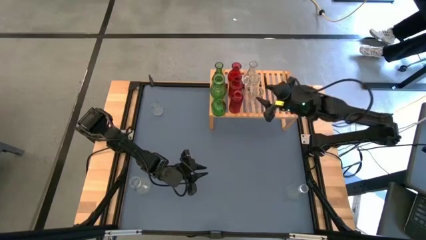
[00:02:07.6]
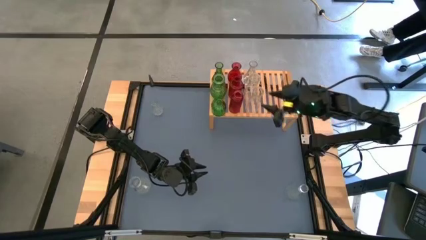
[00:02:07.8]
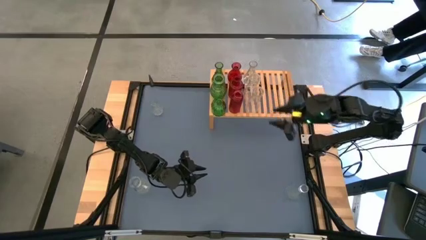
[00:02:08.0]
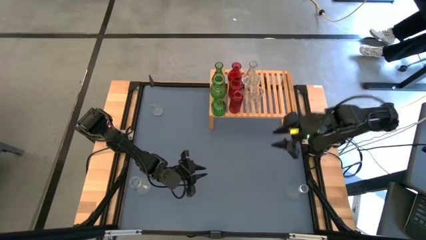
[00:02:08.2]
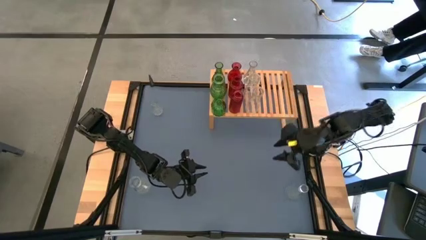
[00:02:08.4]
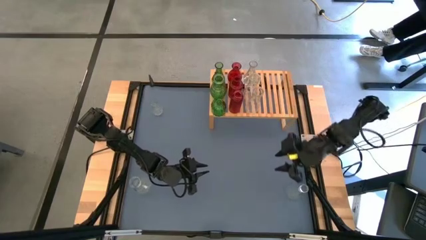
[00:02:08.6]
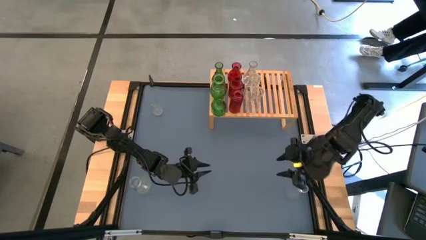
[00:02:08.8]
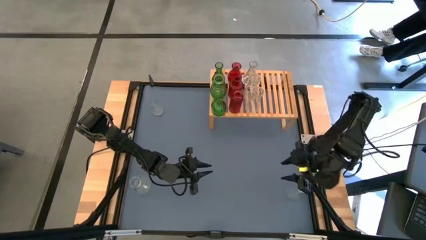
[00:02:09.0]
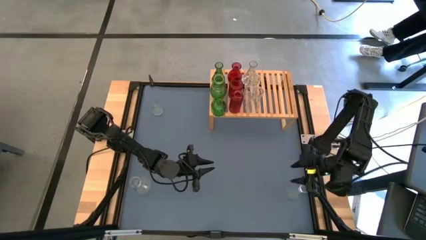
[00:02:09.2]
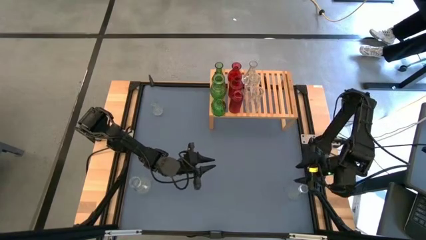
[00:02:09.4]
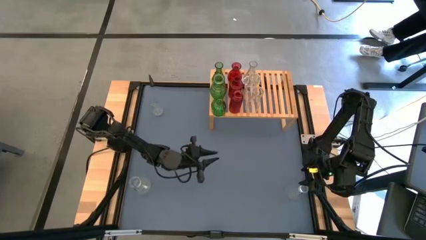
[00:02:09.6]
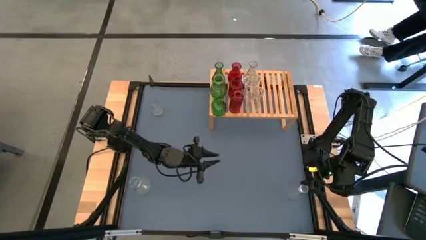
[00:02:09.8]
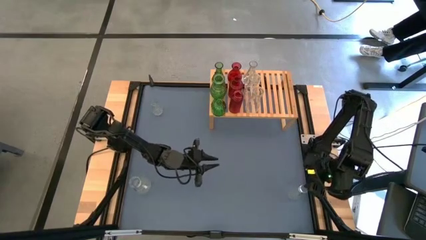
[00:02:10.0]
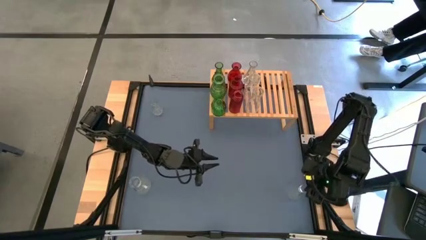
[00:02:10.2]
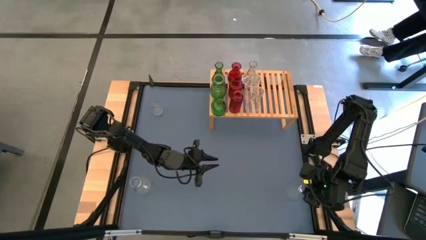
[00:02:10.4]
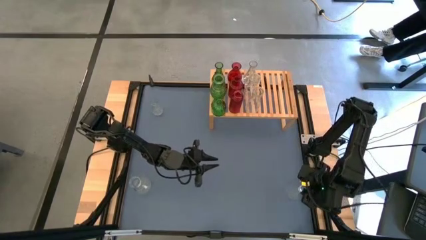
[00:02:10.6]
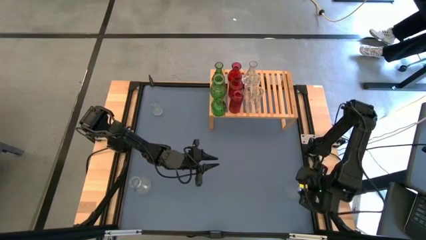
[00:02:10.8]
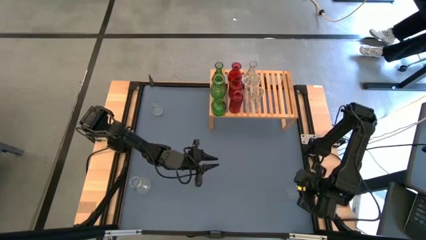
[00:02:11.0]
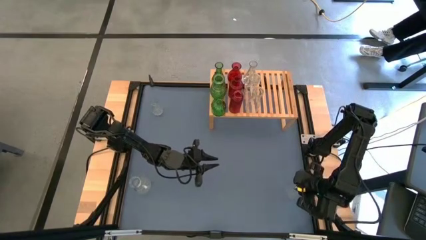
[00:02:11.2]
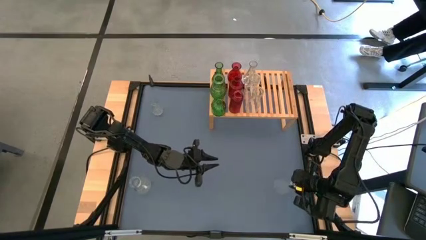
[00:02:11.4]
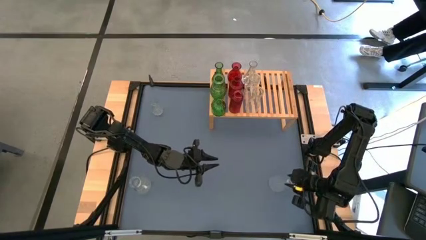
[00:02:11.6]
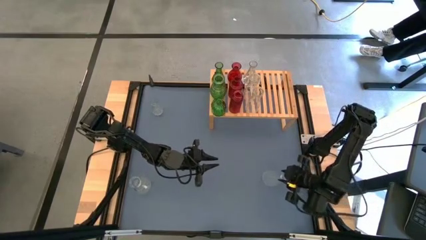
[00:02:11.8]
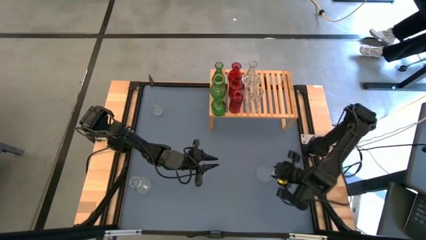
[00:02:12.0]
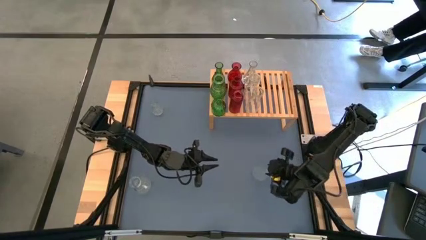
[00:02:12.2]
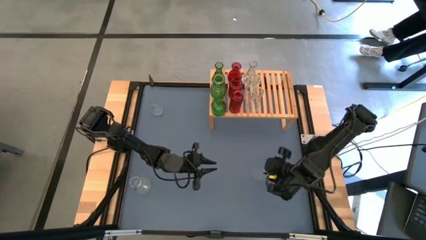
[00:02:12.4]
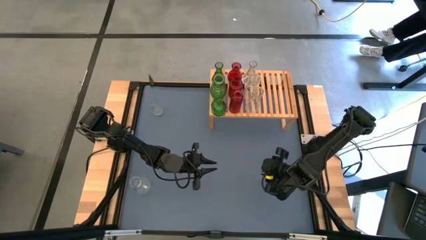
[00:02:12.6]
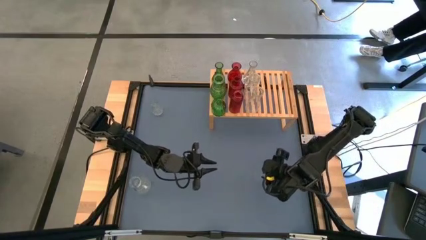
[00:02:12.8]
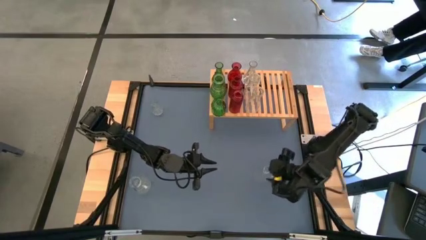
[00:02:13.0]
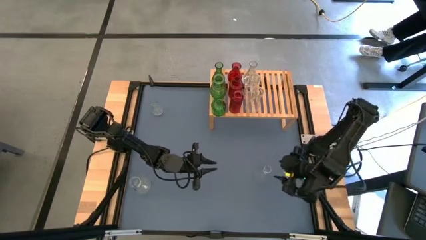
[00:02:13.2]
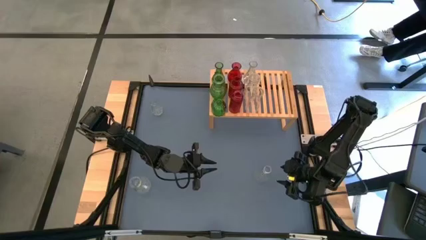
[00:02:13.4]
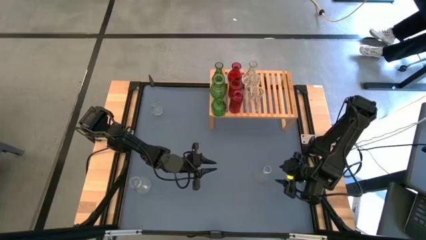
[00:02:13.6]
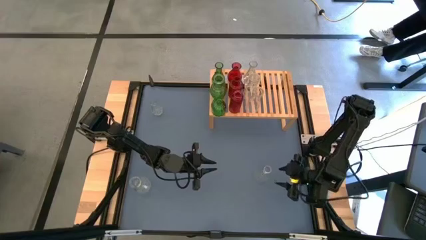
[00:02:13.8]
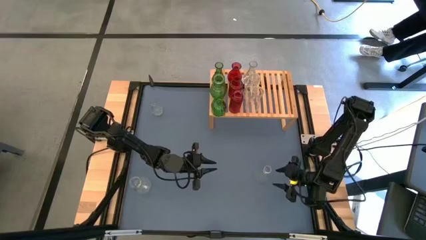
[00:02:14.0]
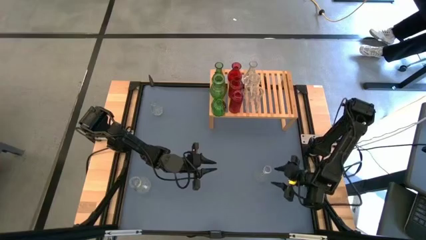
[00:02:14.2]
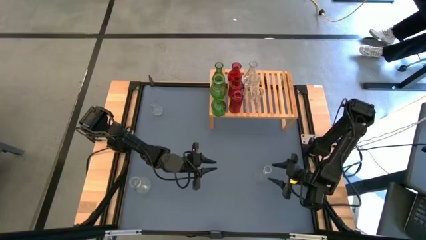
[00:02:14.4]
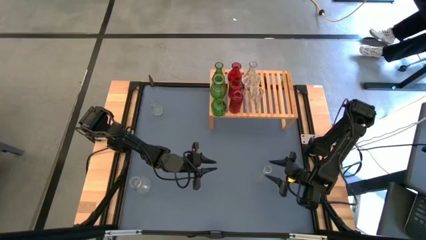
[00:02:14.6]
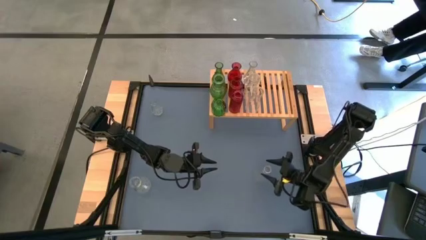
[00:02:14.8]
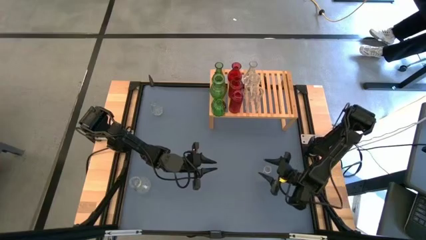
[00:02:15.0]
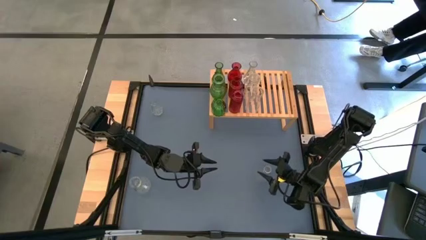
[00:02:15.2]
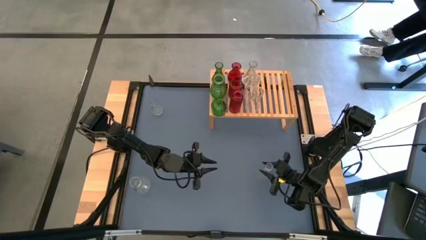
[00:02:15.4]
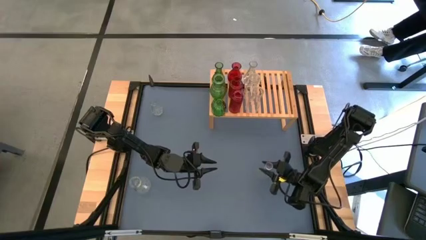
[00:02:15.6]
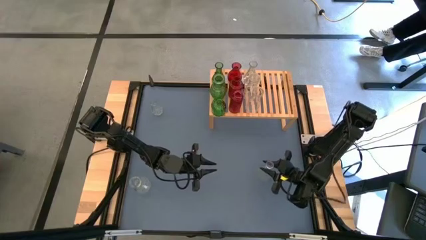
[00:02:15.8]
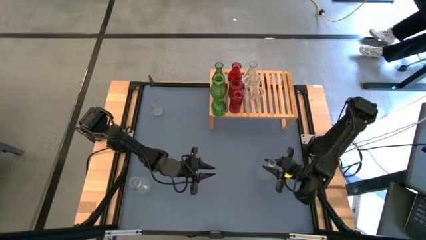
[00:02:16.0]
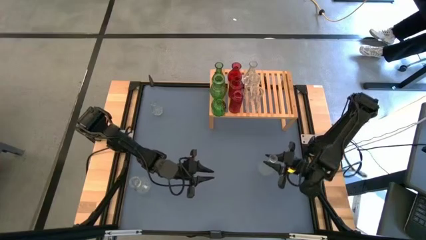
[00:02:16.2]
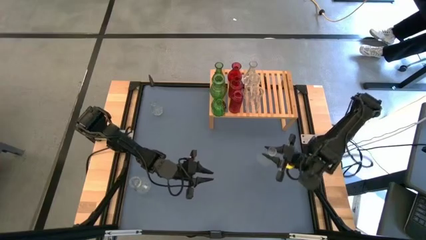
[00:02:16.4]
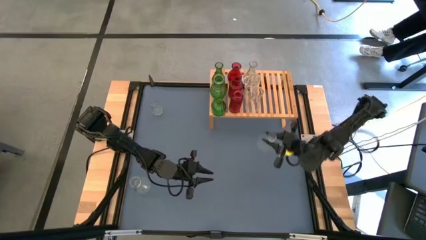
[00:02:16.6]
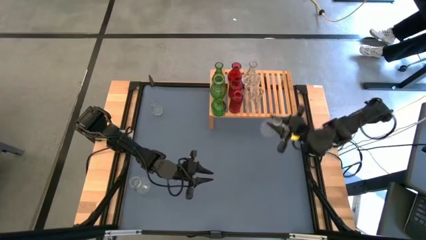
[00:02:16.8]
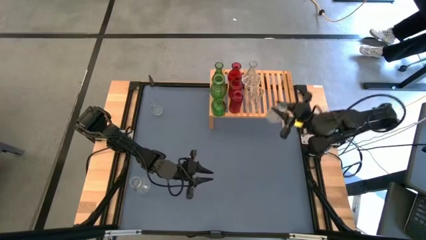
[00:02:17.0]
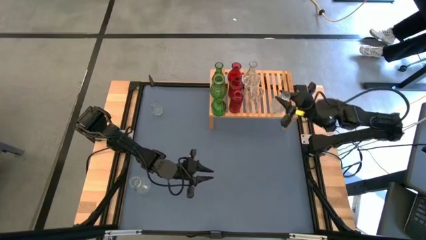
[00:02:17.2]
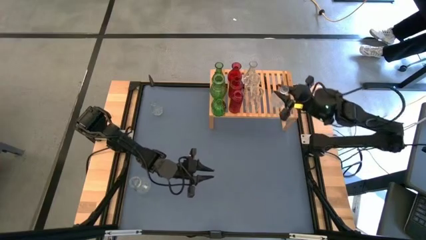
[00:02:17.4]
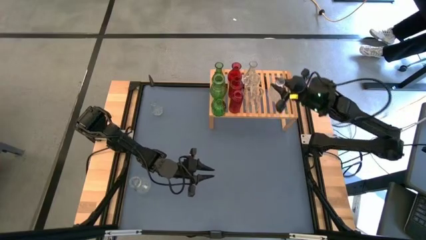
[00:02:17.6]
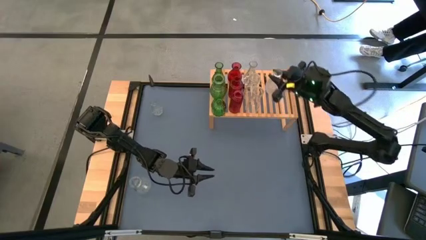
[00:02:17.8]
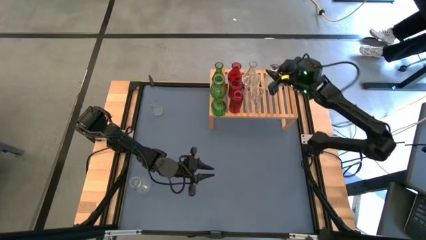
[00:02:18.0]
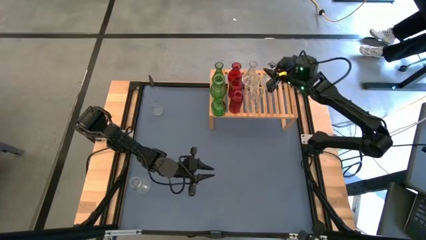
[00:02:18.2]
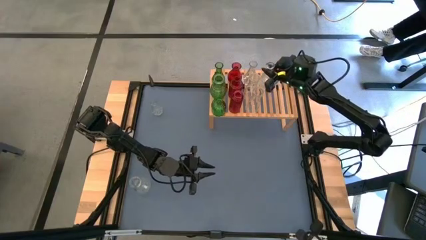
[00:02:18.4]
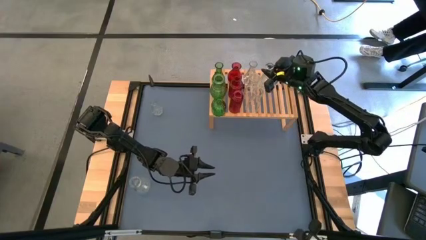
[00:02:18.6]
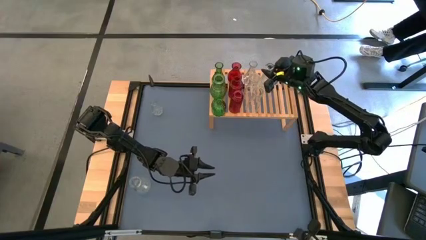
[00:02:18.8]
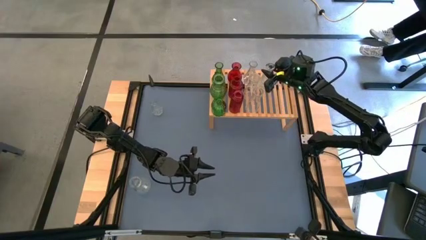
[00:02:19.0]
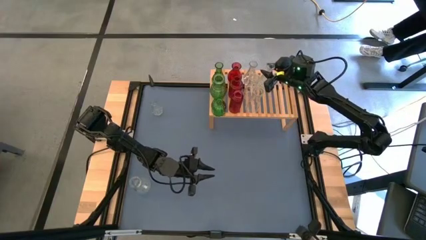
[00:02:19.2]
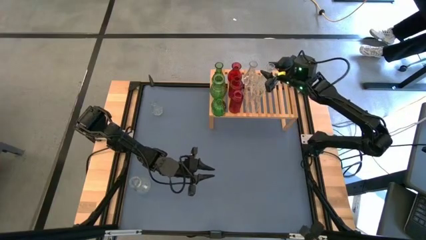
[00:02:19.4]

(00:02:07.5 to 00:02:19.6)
Task: sort vases onto shelf
Put the bottom right transparent vase on the shelf
